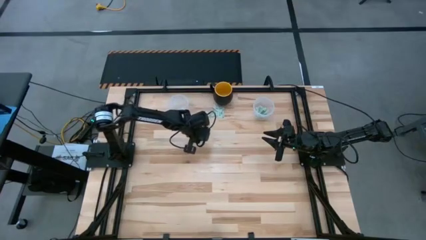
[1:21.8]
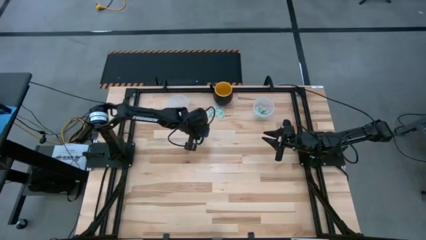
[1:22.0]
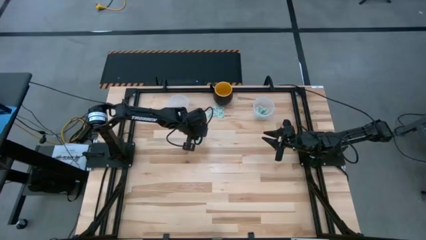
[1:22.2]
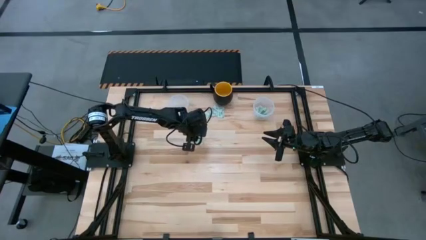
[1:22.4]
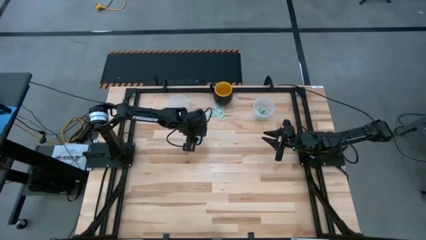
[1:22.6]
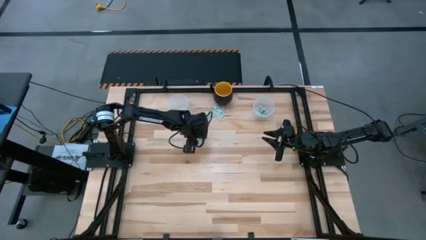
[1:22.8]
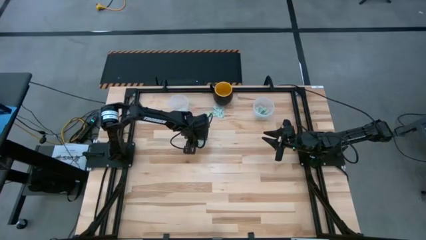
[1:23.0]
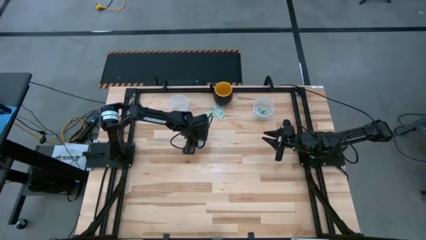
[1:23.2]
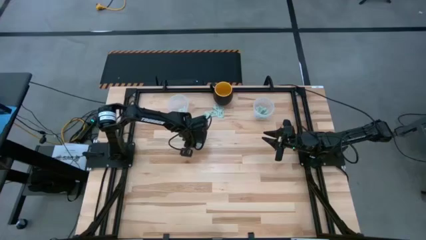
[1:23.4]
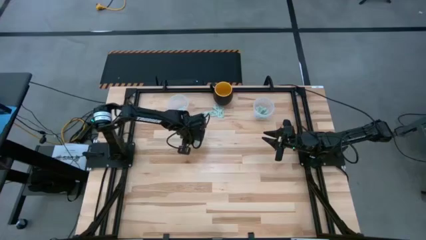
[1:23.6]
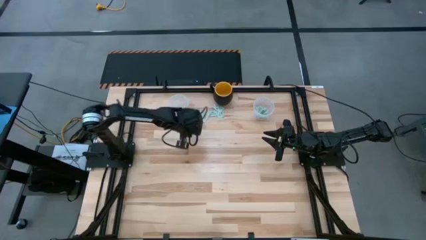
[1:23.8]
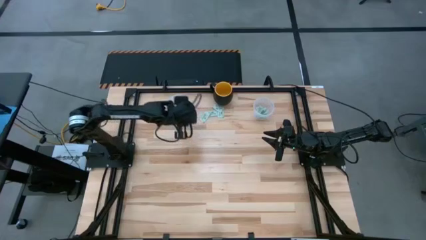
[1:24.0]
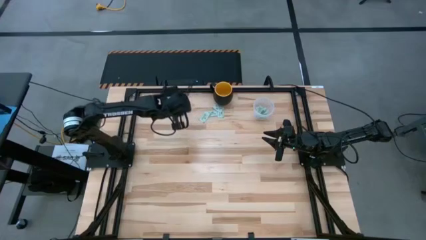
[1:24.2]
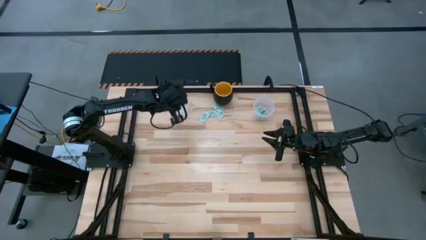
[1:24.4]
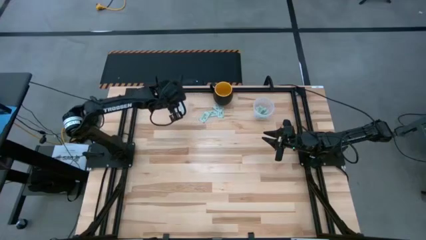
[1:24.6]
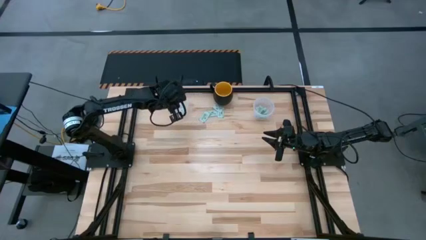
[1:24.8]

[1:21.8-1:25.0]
Task: Pick and place Stevia / Truvia into bins
Put the stevia packet into the left transparent container

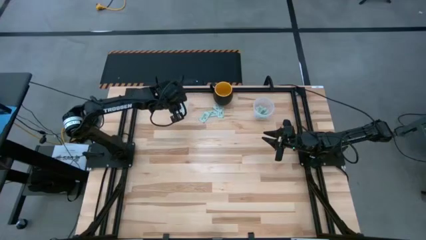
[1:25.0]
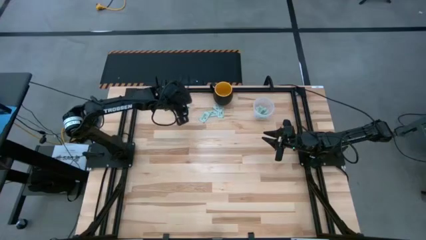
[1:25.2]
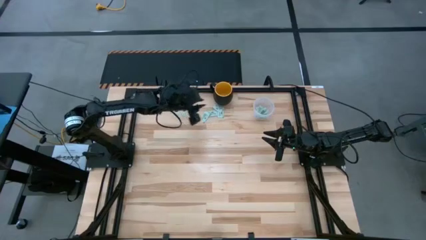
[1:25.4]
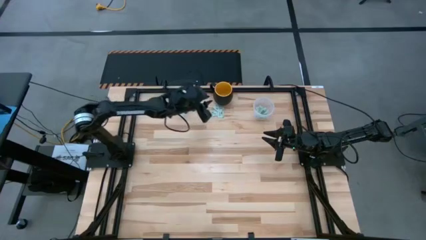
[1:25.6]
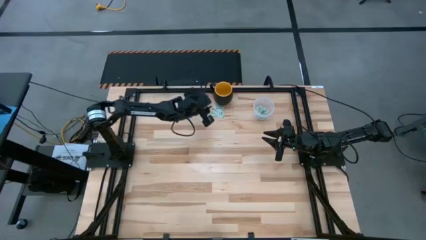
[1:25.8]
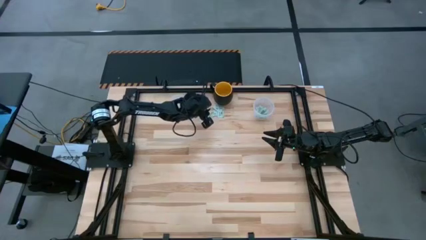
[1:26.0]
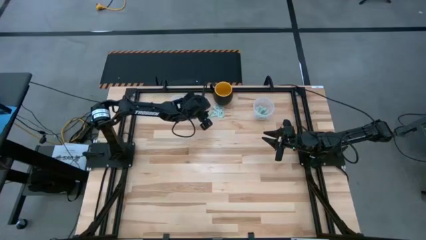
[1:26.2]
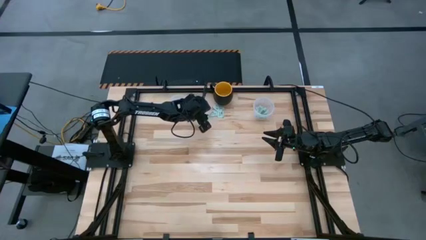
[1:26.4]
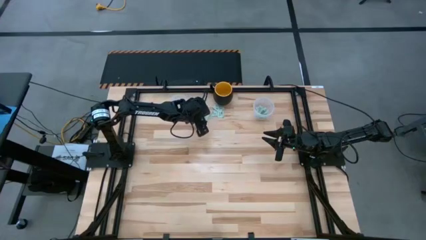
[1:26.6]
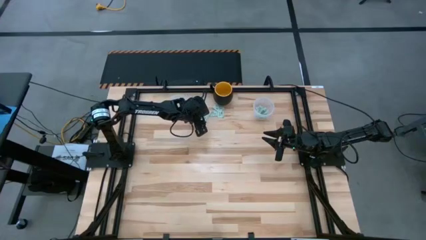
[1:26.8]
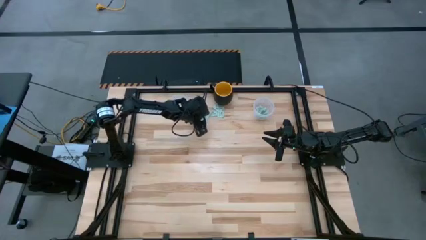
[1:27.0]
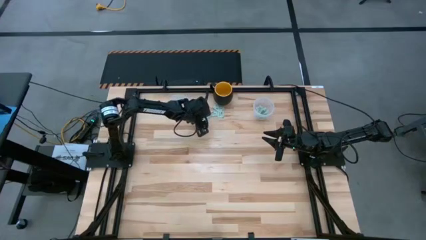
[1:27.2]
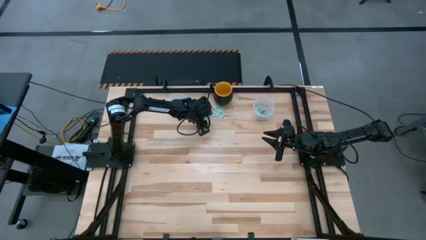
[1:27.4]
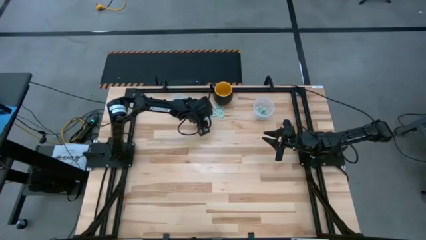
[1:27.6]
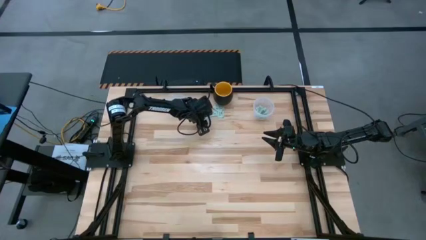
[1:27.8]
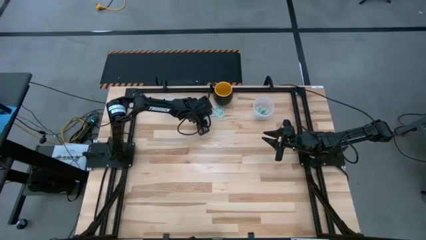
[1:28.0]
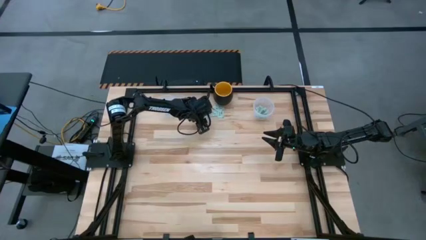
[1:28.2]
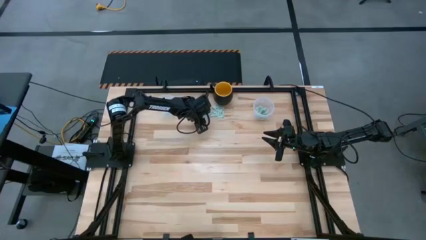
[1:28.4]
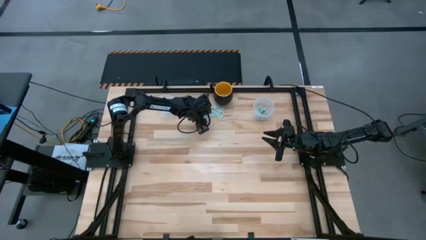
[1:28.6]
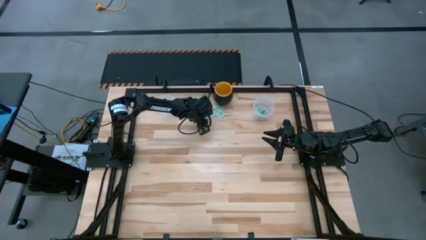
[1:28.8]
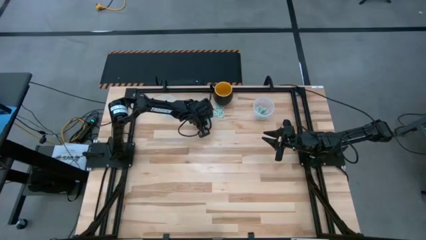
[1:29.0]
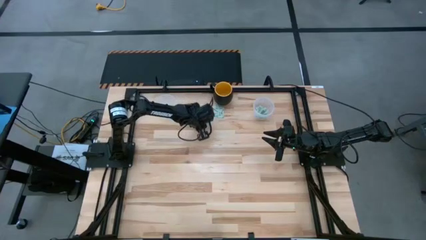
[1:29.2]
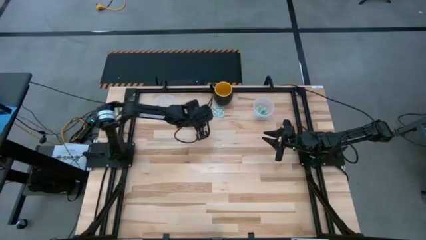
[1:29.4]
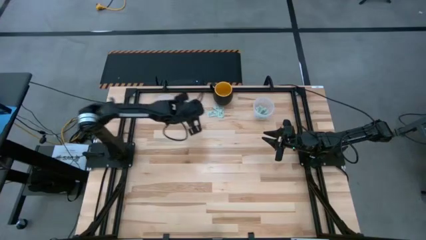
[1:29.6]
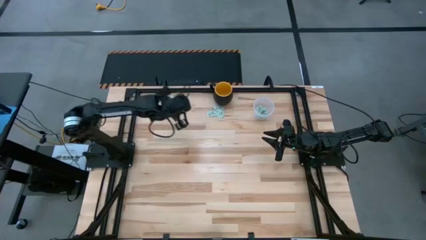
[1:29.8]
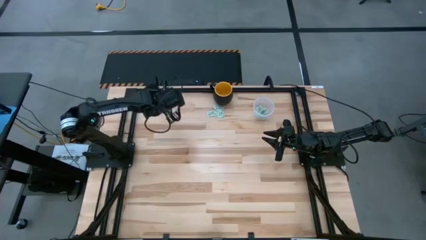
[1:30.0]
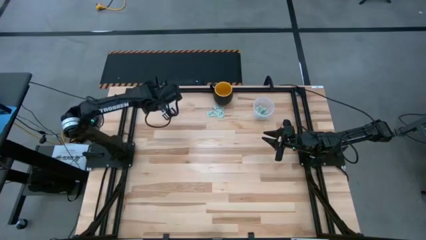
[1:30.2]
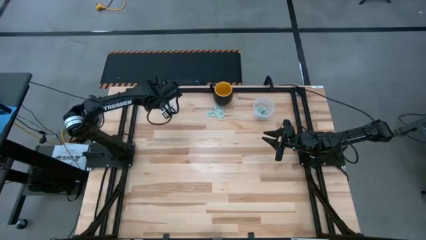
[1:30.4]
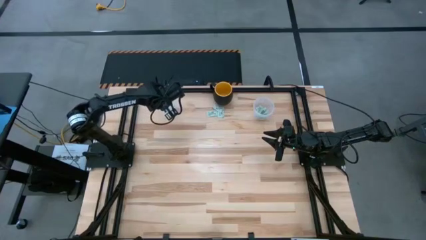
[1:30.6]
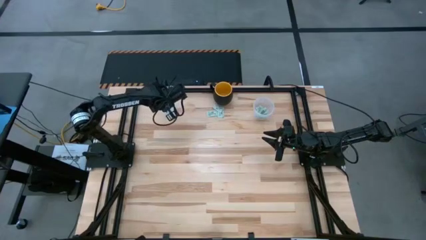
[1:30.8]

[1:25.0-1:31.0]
Put the stevia packet into the left transparent container

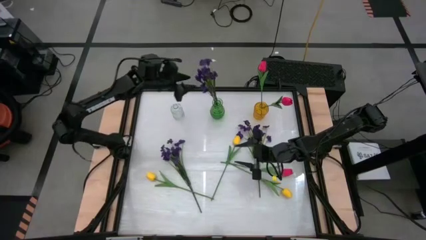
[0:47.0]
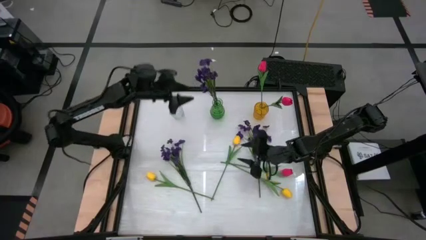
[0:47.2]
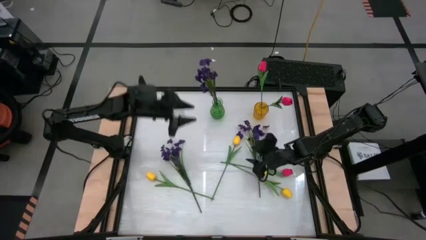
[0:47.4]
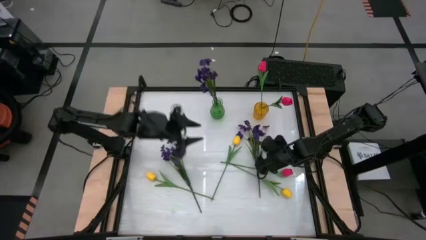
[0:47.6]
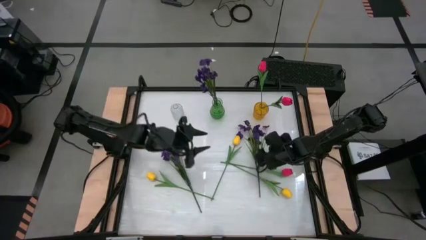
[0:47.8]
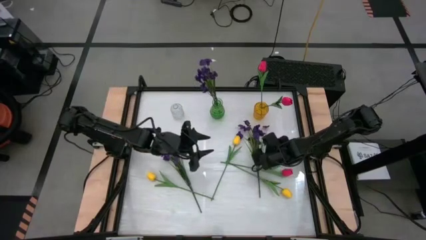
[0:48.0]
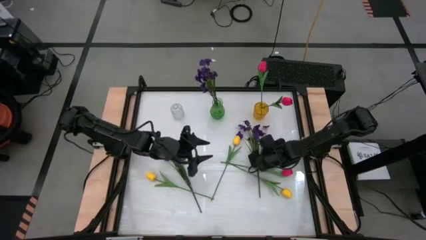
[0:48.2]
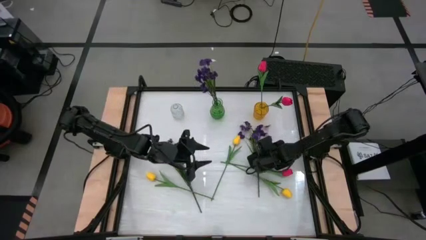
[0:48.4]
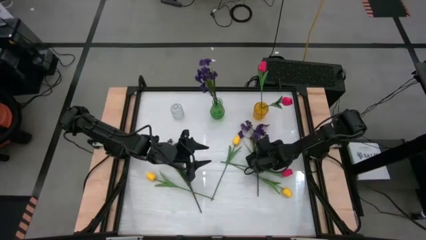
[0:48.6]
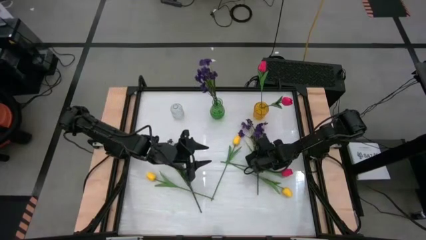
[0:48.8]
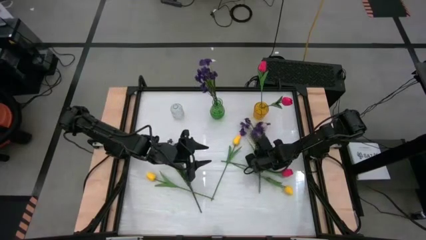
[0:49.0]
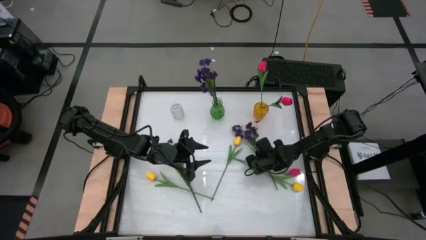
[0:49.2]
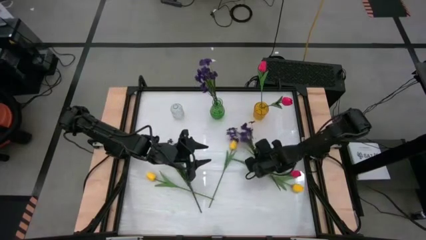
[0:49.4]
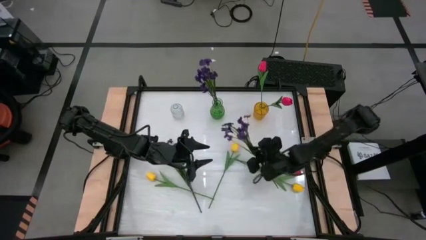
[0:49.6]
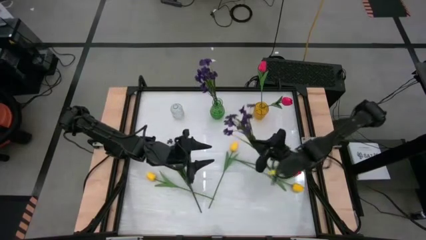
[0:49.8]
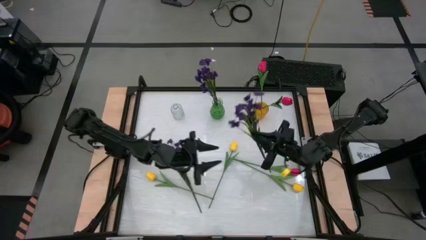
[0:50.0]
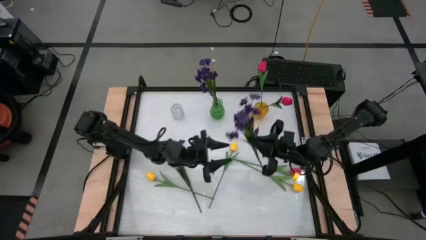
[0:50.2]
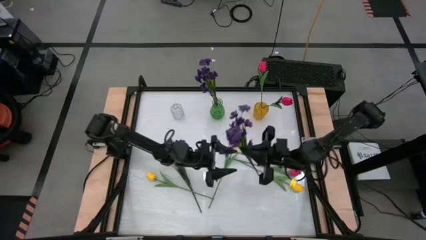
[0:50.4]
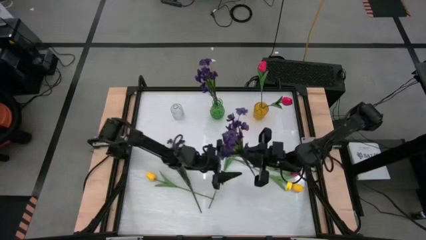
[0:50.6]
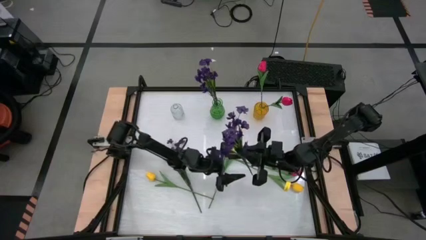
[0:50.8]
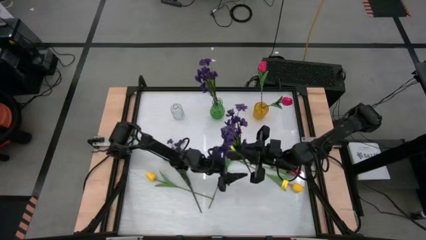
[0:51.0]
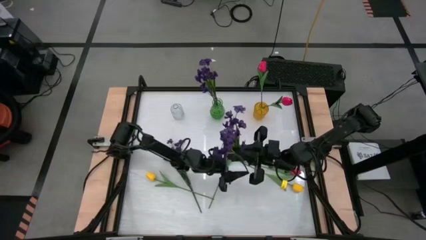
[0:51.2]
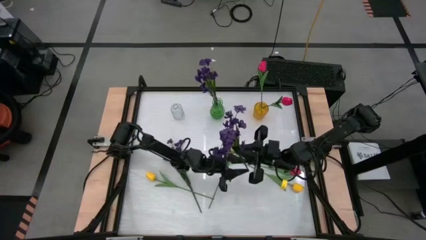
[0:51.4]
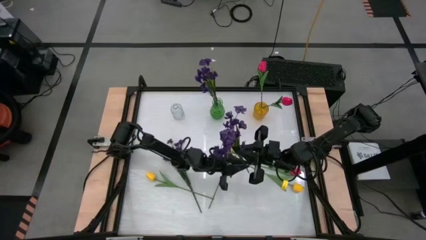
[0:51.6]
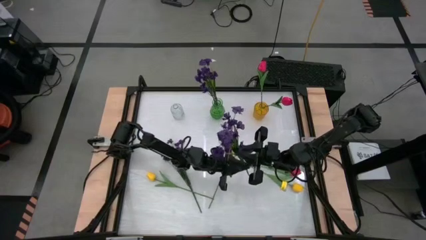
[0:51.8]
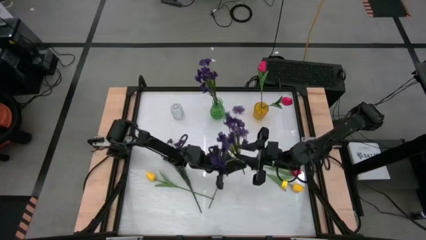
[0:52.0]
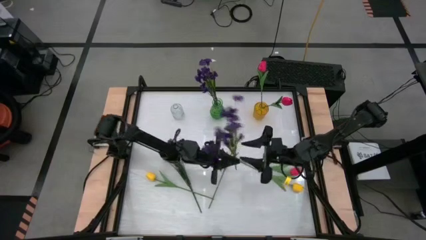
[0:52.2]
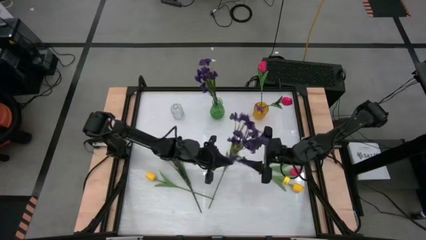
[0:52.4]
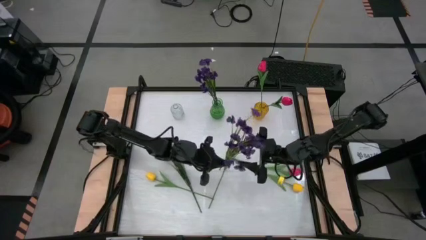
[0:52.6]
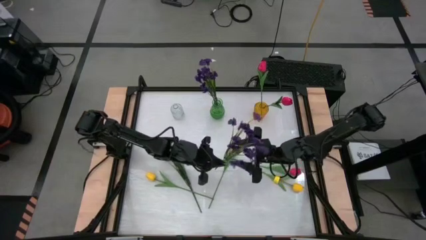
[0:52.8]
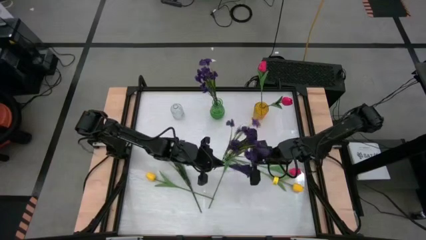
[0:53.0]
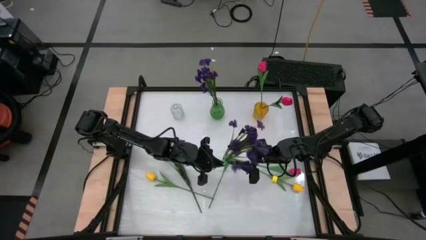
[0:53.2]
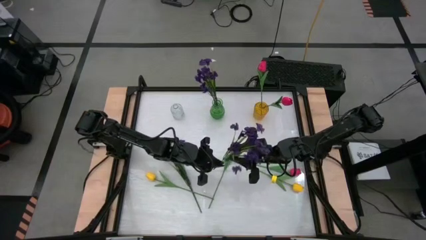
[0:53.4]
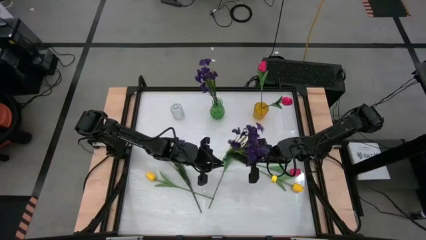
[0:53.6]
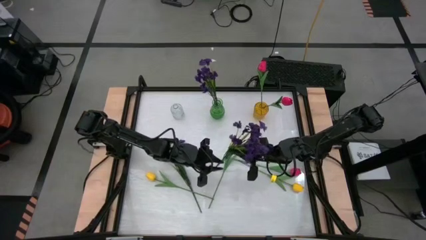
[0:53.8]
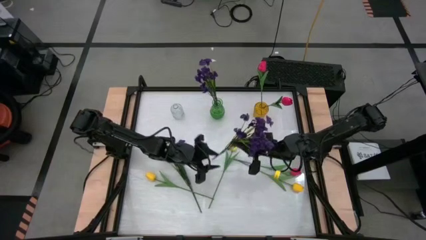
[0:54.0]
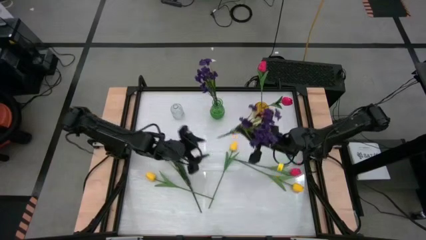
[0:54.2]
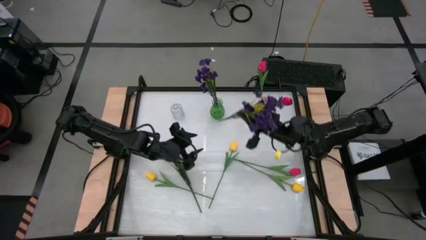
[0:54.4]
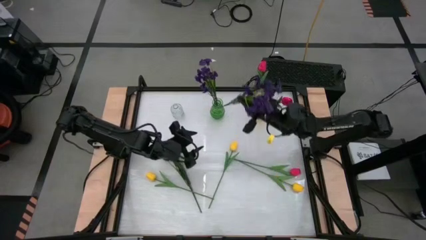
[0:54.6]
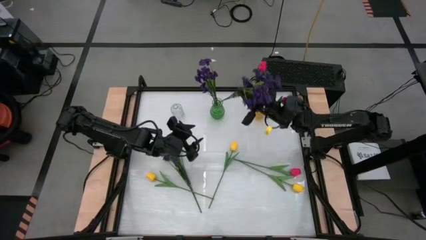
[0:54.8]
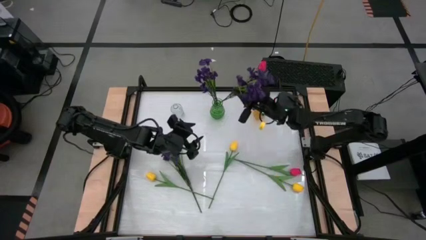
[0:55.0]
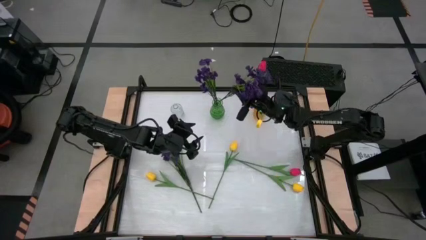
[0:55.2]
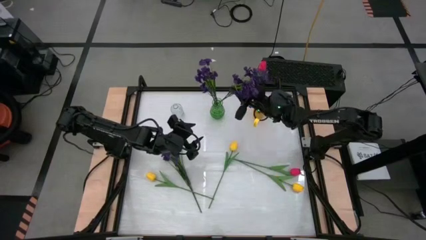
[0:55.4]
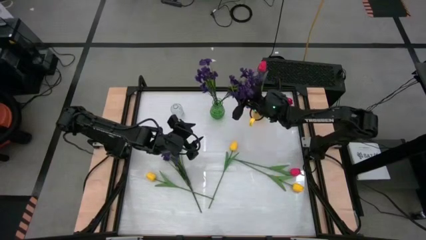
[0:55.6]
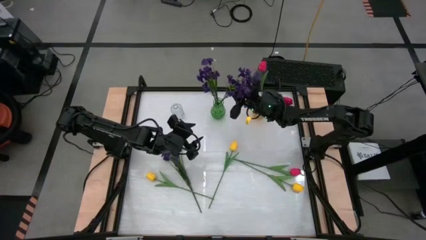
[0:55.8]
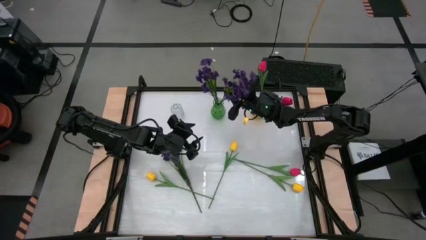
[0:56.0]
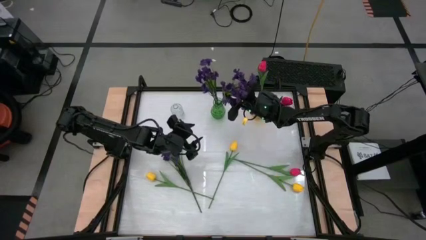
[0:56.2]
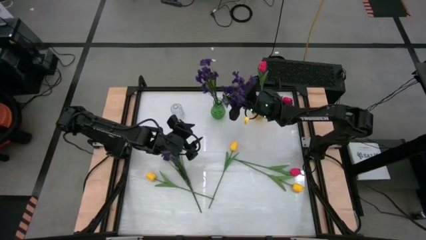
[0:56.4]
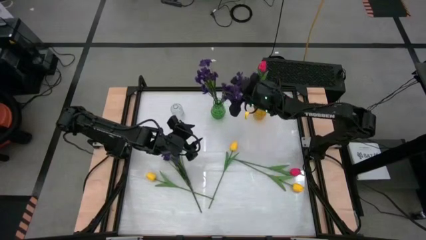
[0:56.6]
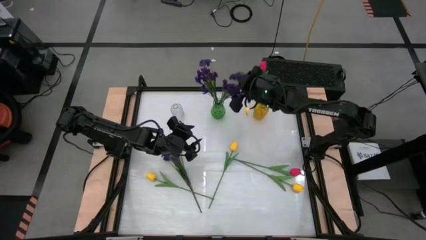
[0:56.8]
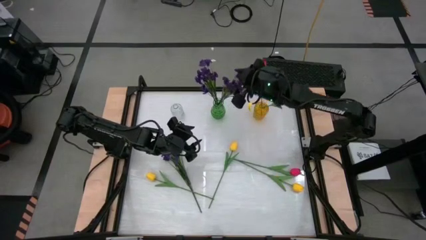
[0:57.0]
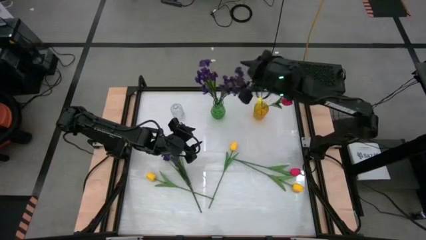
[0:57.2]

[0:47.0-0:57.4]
Task: Sort flowers into vase by color
Put the right purple flowers into the green vase
